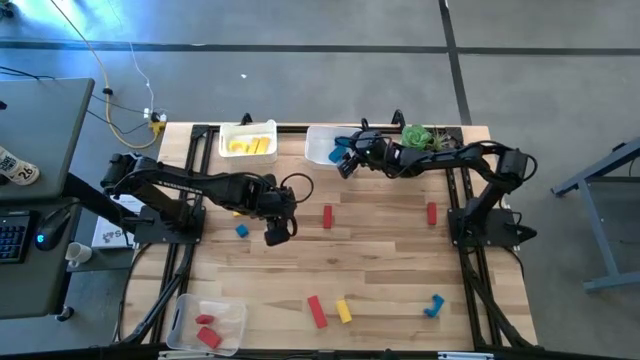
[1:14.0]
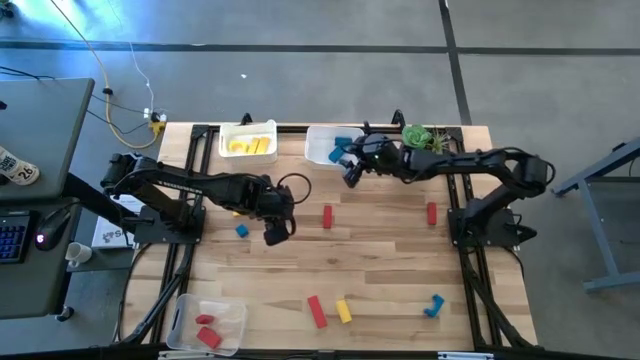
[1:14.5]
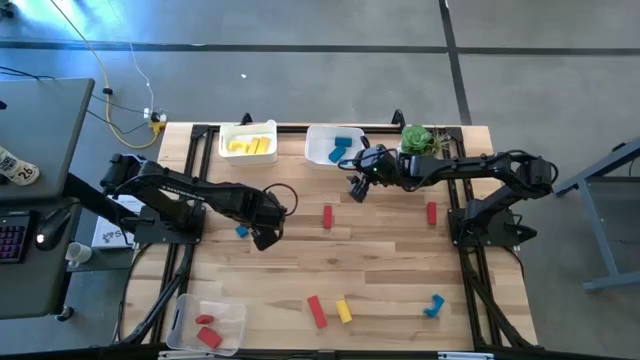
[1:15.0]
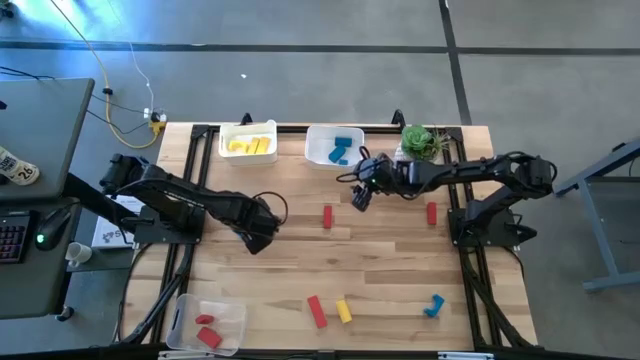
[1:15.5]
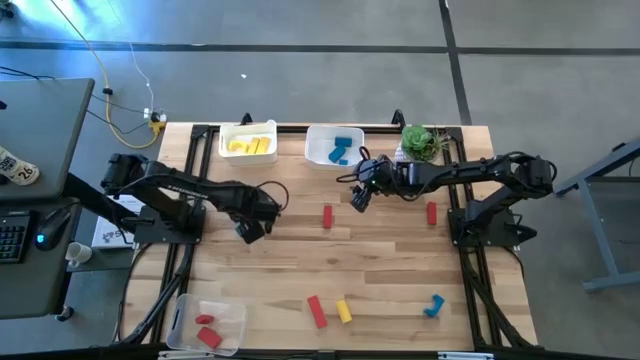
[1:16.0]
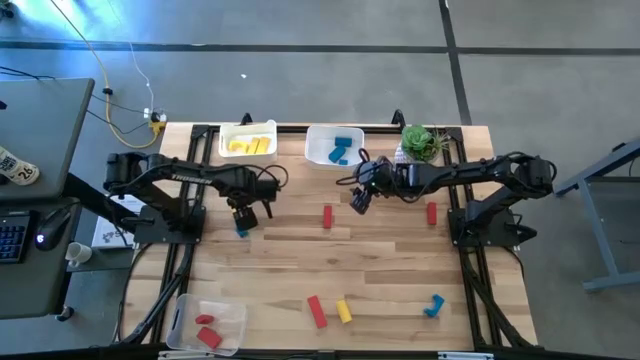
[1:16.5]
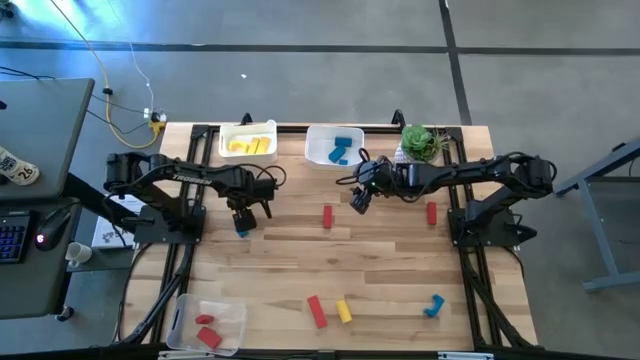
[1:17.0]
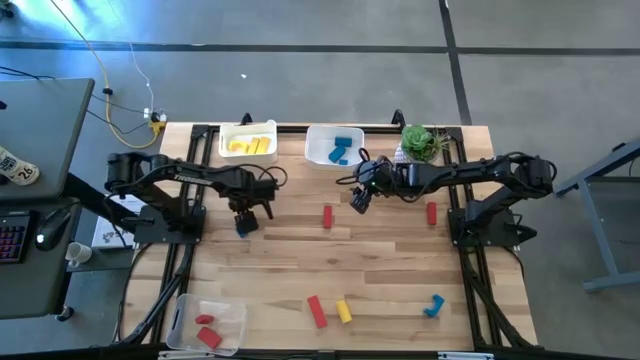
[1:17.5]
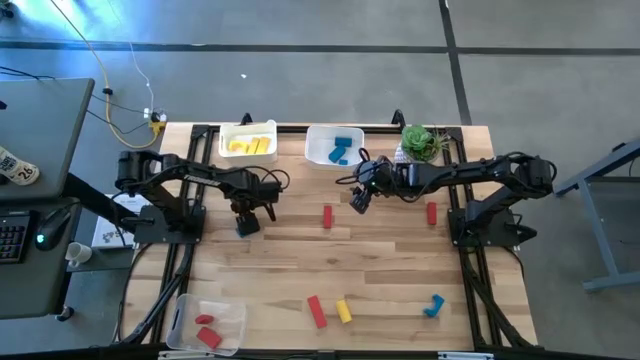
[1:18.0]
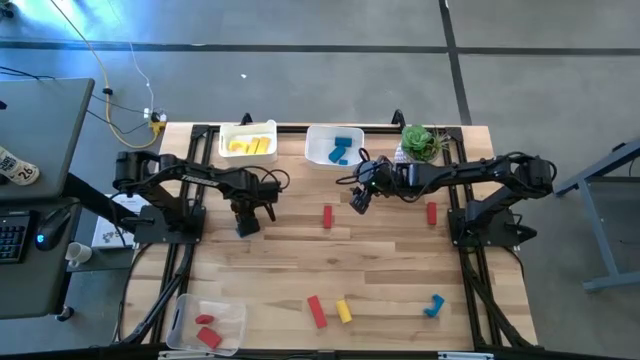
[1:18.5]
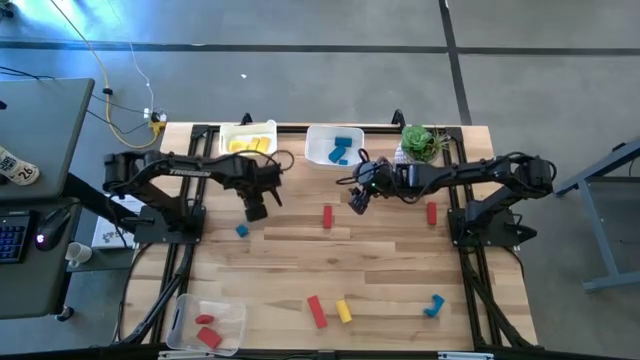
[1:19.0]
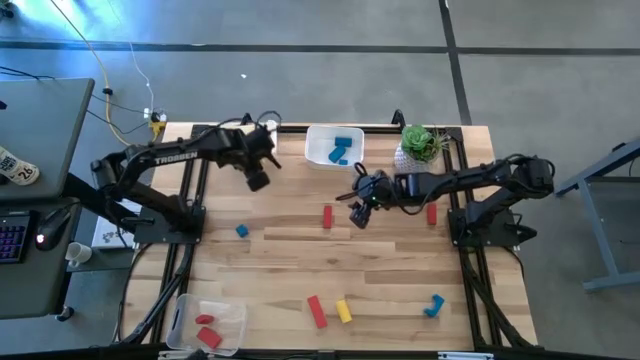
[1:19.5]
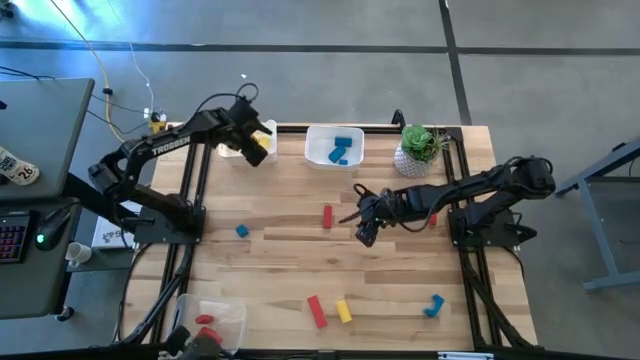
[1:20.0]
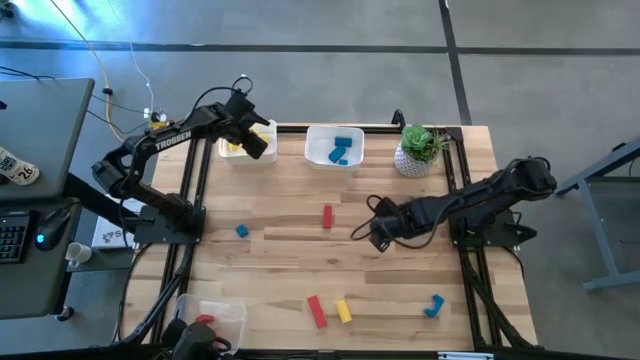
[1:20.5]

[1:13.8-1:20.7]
Task: Sort & place blocks by color
Put the yellow block into the left white bin

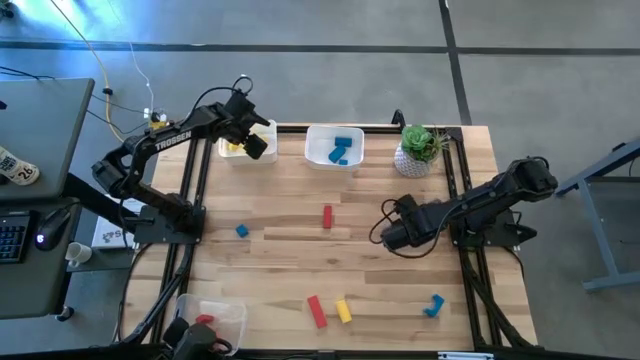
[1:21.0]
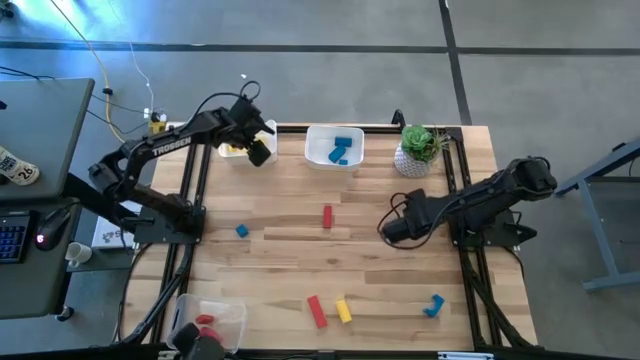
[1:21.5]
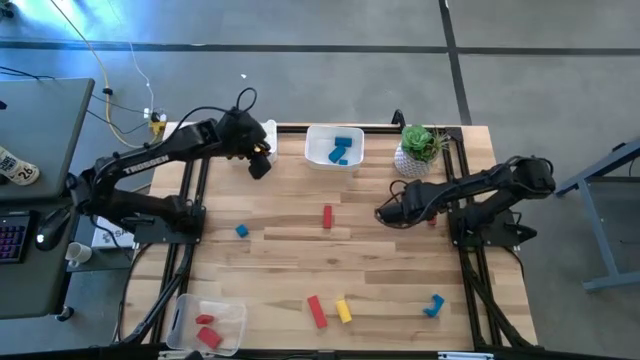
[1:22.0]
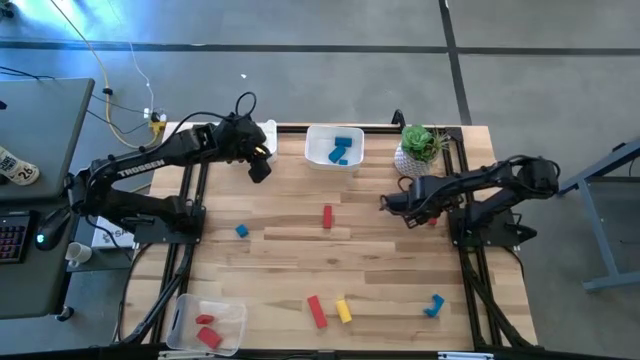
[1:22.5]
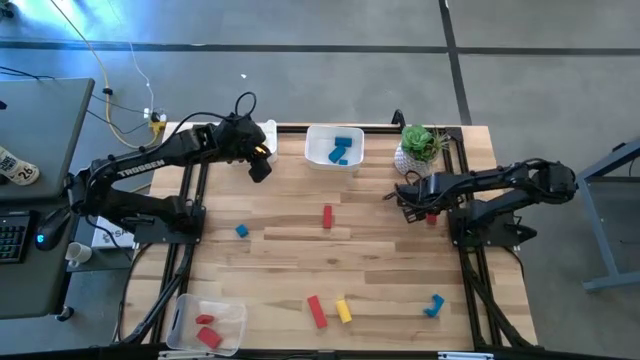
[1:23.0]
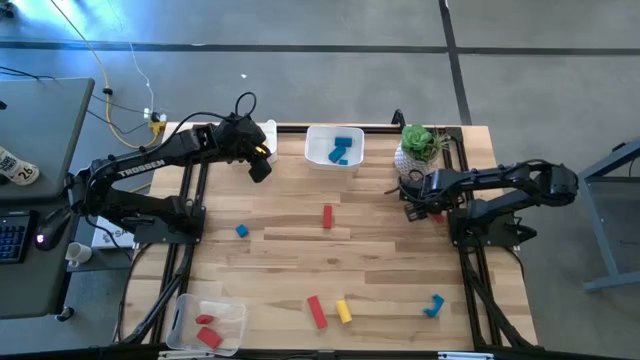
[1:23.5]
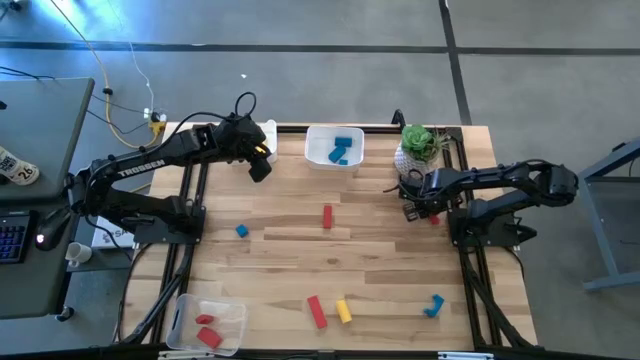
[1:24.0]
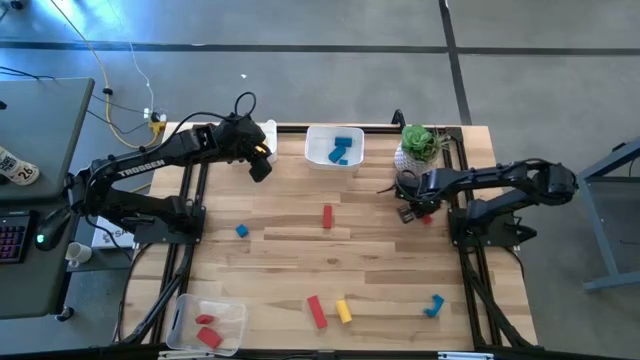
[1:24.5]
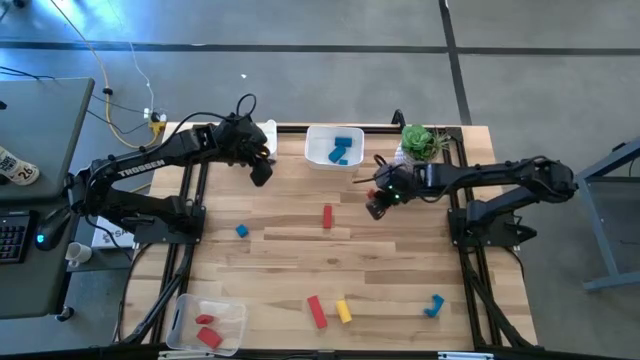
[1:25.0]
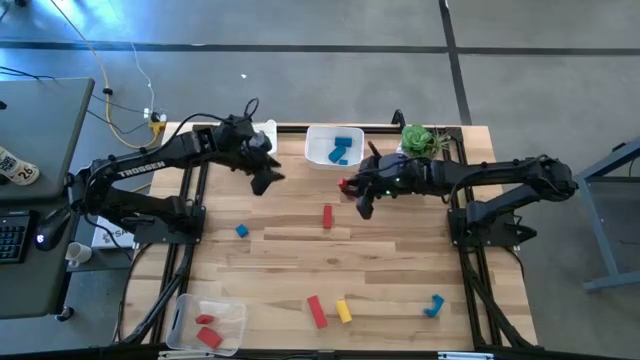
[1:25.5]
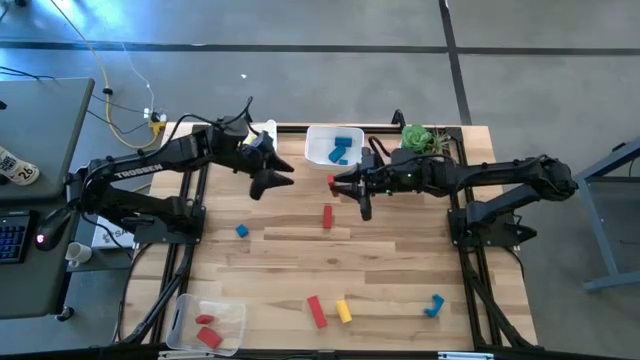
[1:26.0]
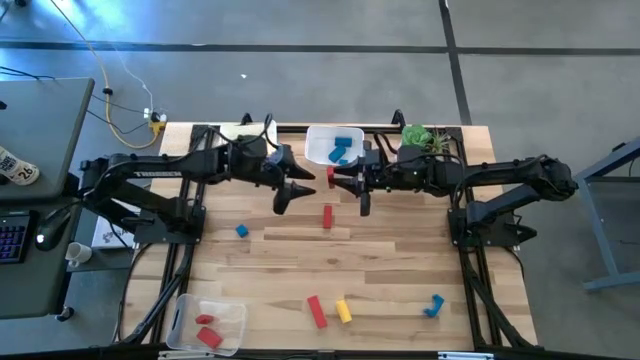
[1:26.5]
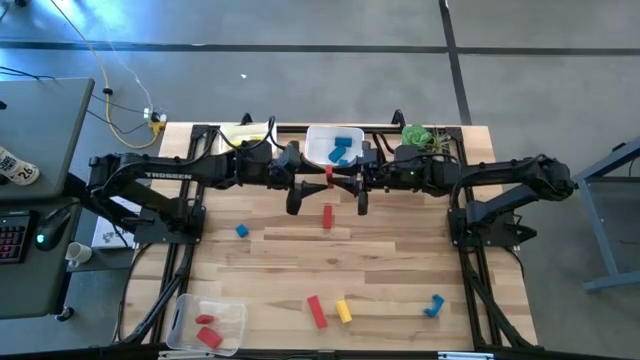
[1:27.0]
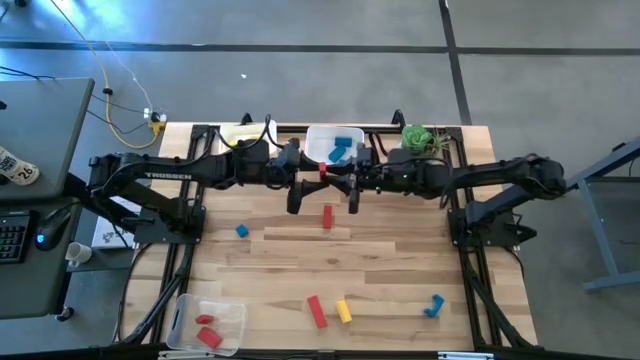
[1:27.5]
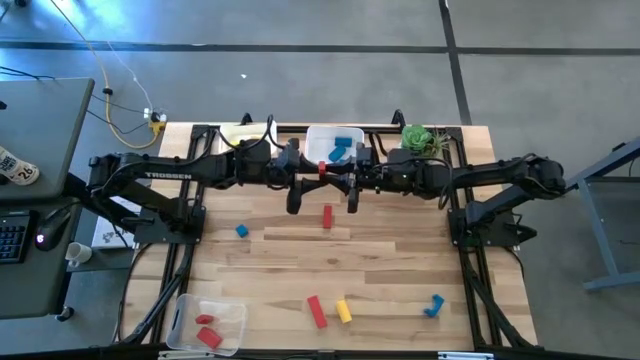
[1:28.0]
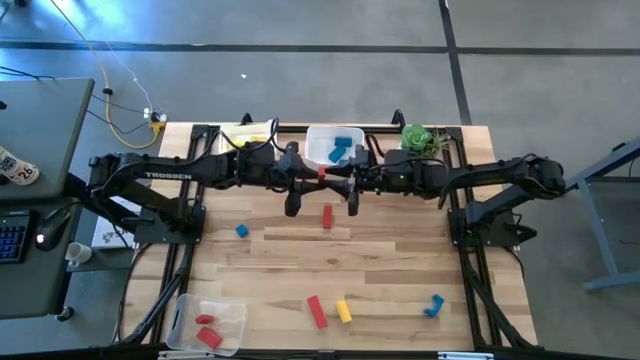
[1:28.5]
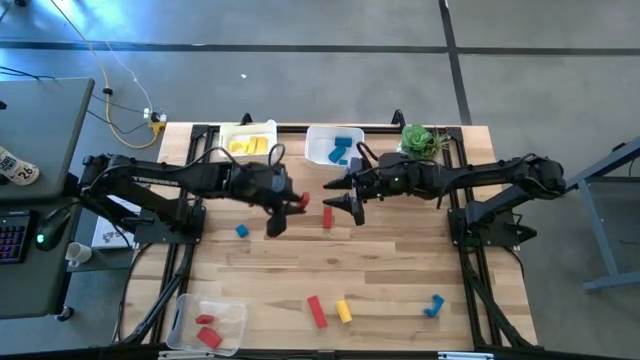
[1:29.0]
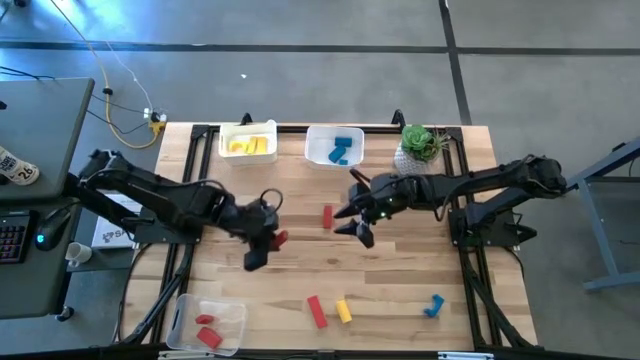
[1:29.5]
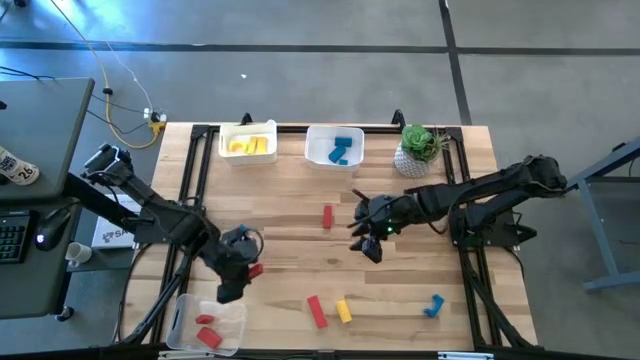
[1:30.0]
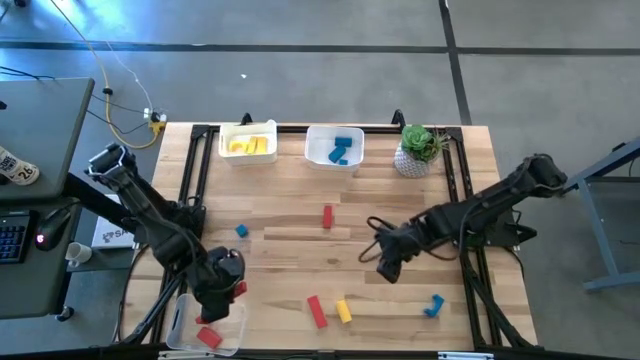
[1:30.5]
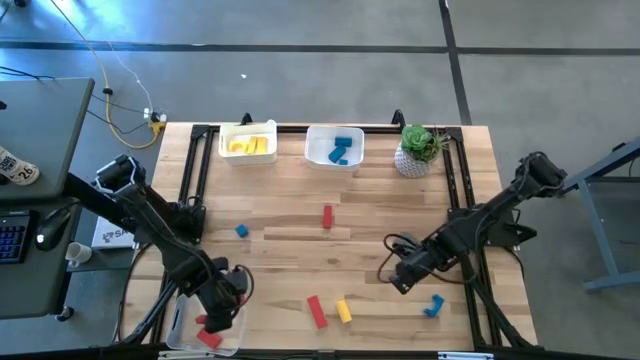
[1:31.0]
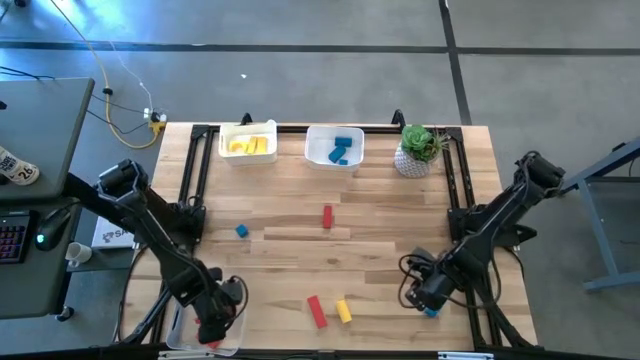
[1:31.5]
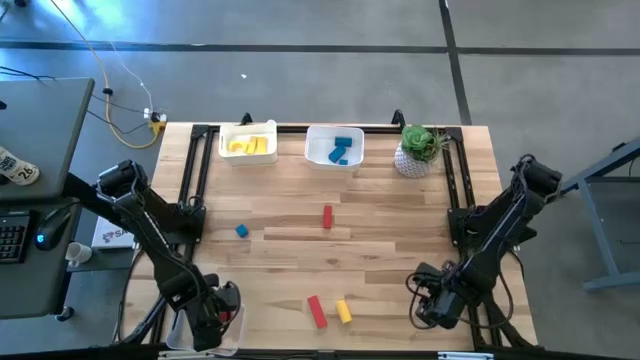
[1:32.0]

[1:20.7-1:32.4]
Put the red block into the transparent bin

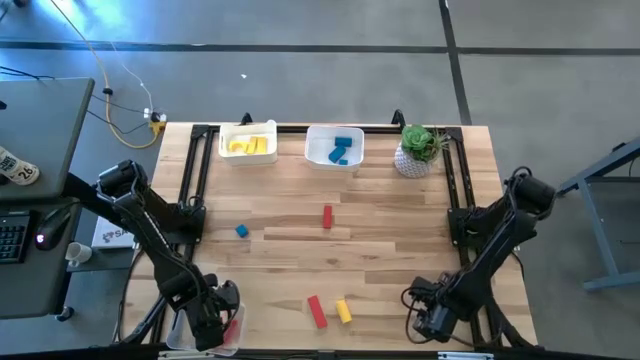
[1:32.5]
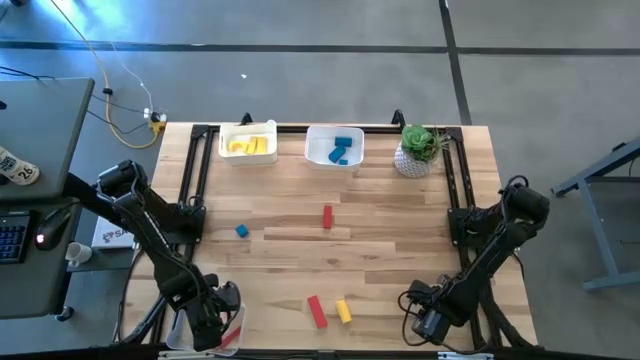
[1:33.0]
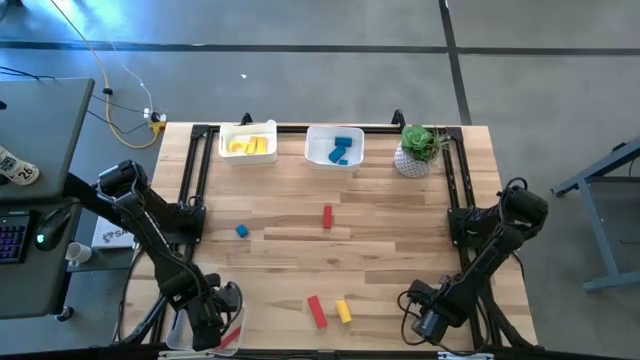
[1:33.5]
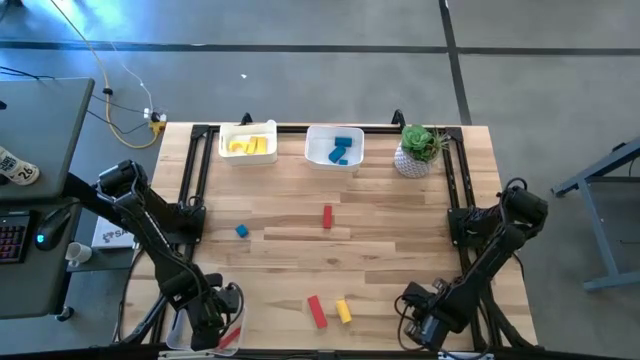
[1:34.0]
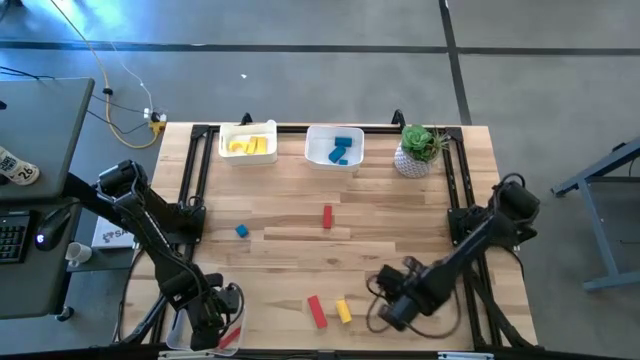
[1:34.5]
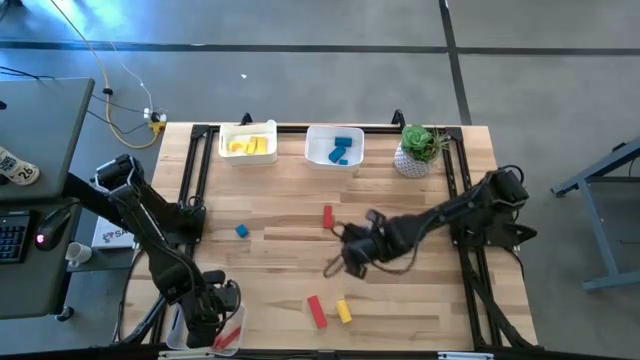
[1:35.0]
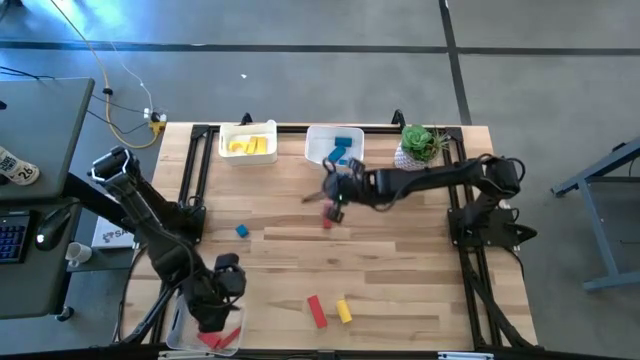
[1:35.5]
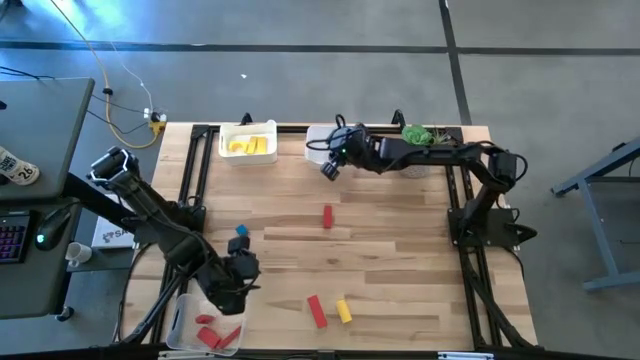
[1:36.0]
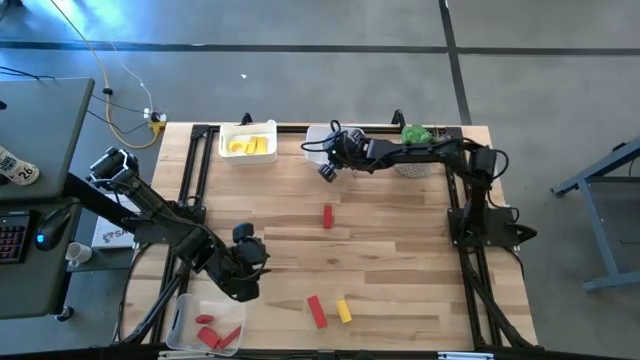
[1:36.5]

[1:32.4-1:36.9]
Put the blue block into the right white bin
